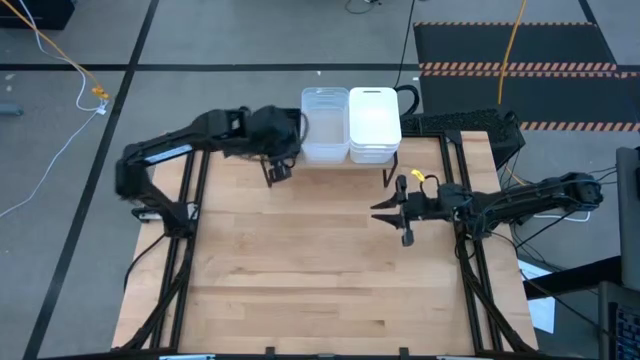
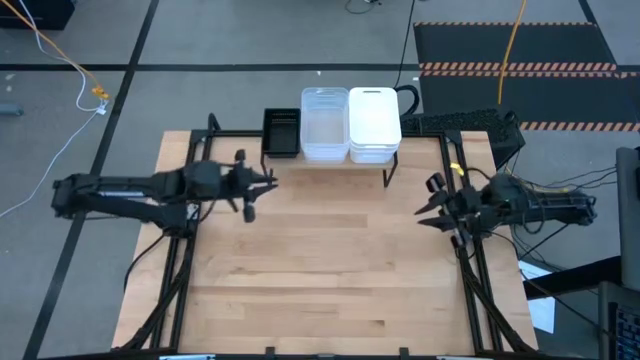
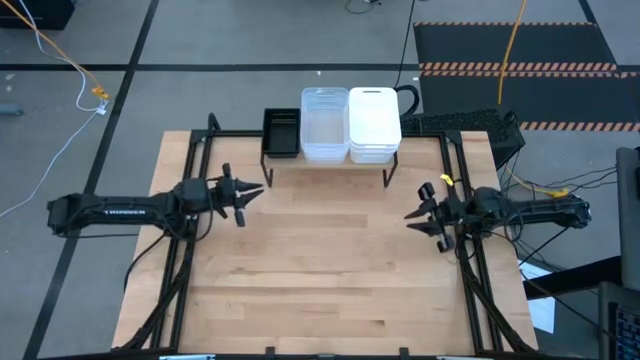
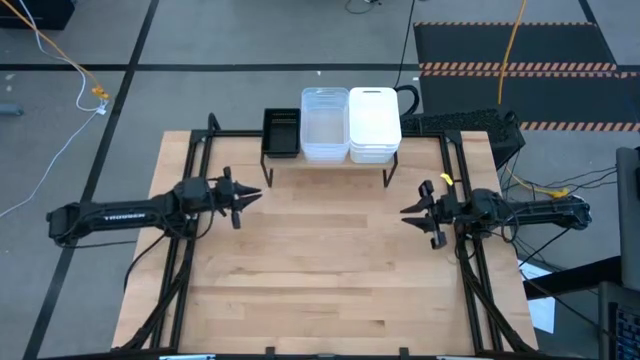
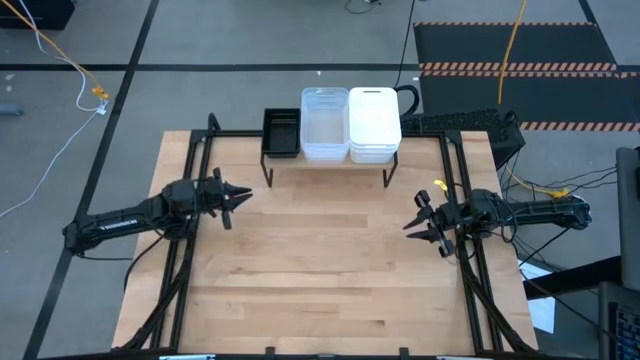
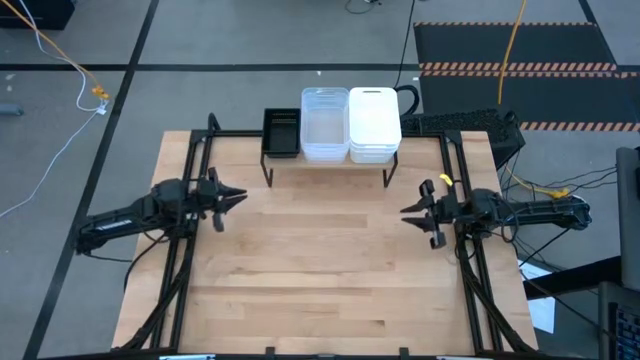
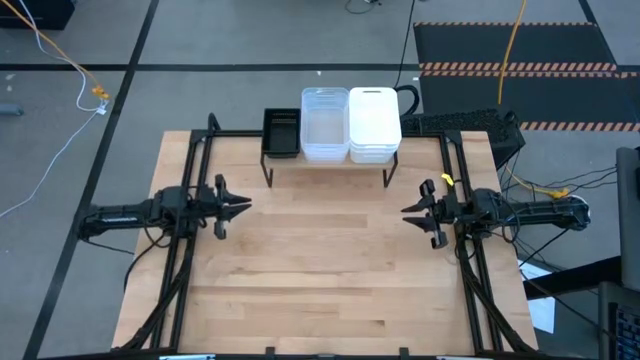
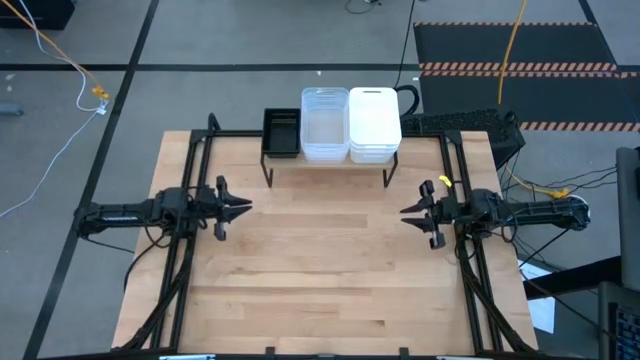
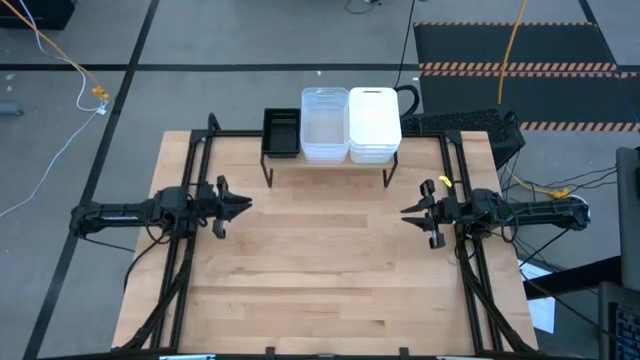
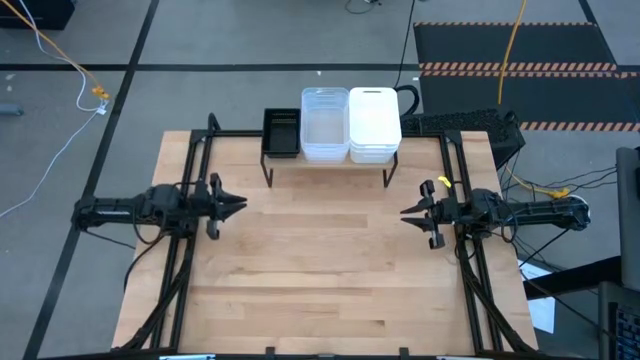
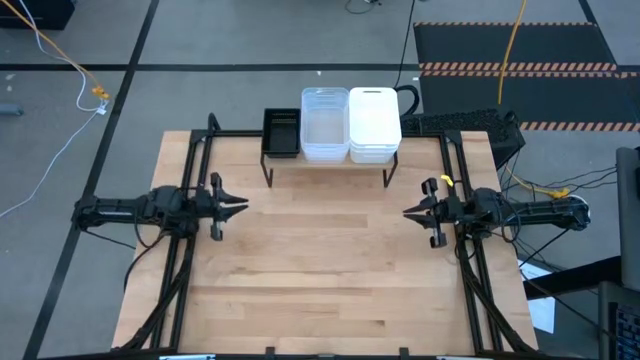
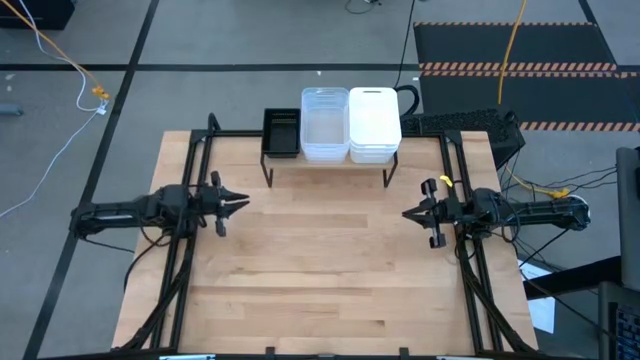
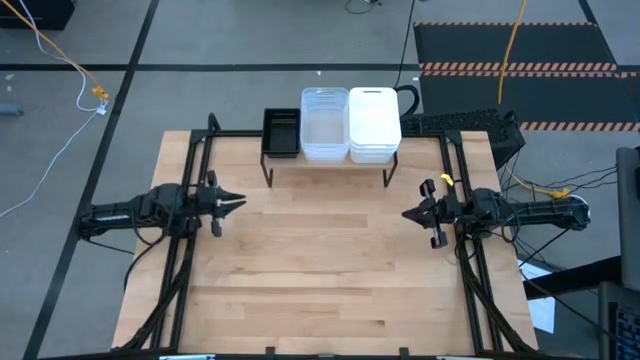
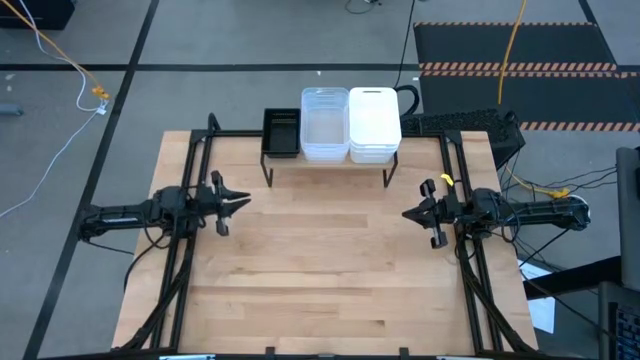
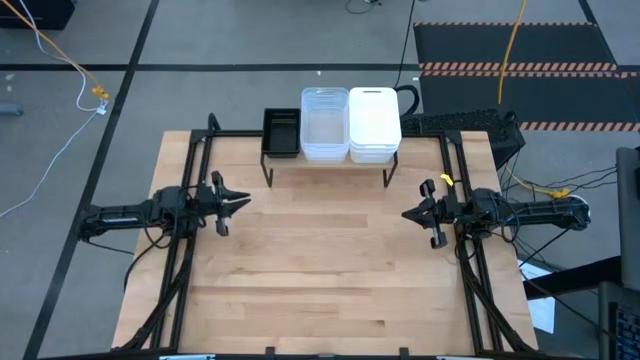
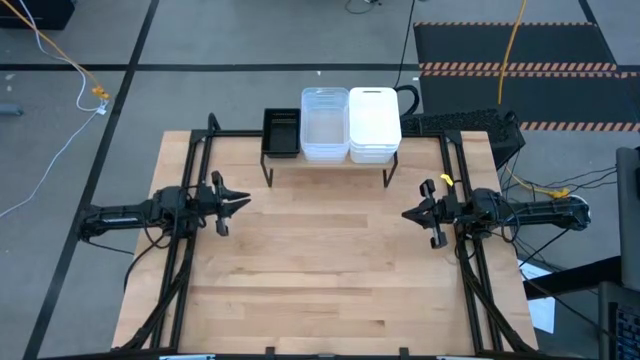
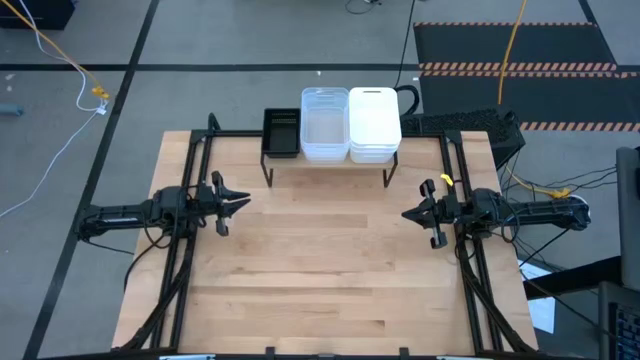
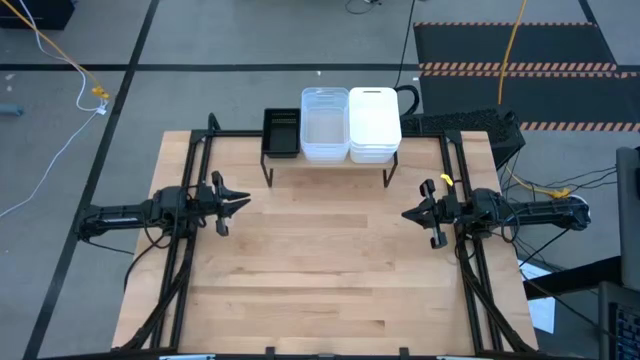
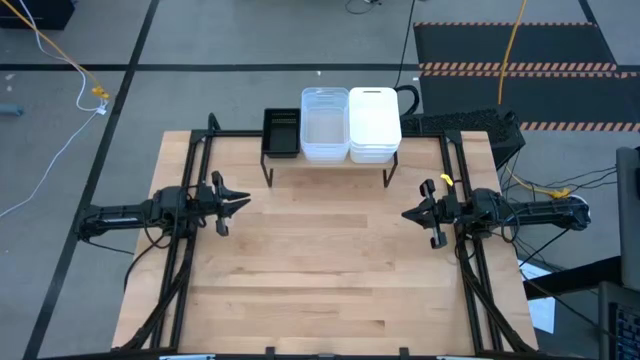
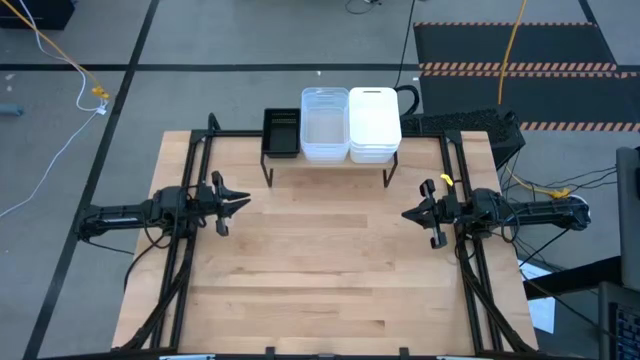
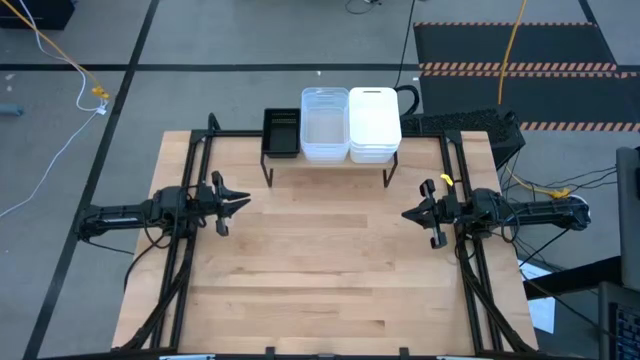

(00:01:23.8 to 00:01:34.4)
Task: Stack baskets on shelf by color
Return to Home Position

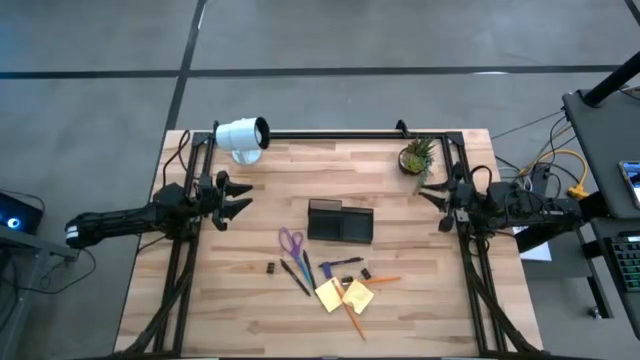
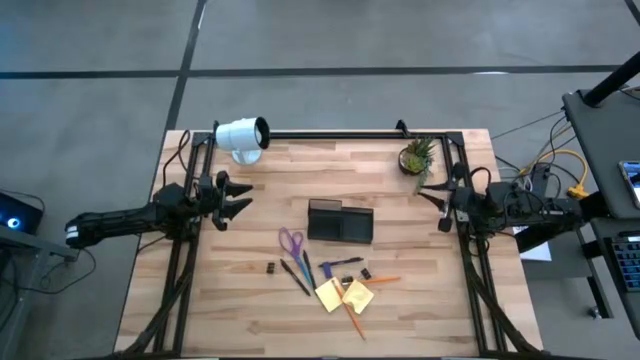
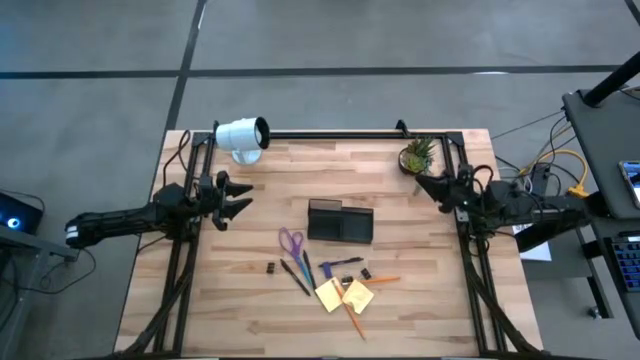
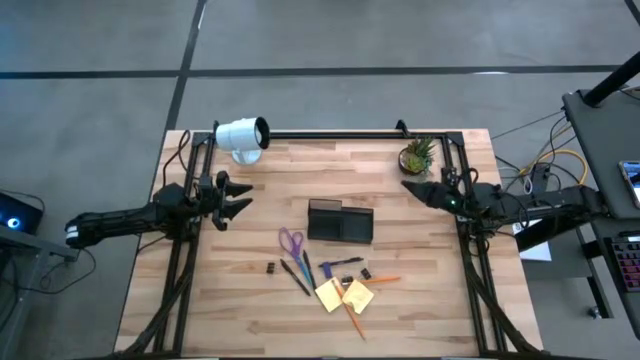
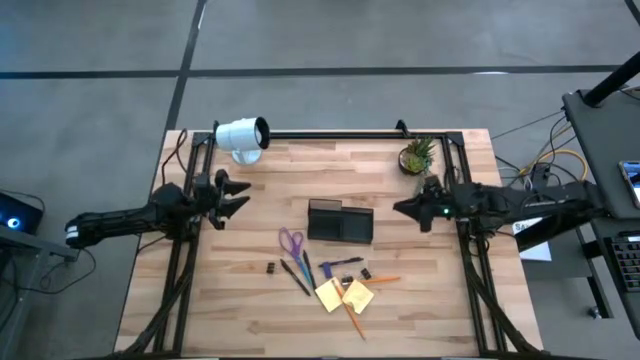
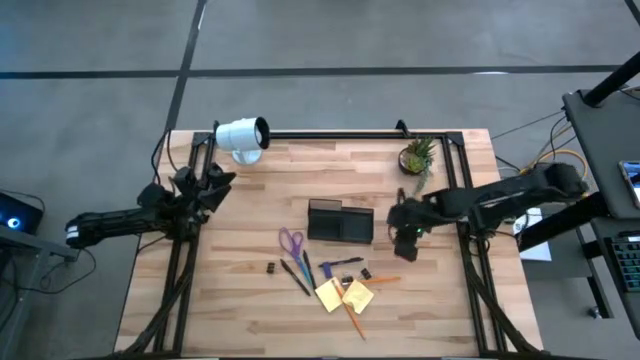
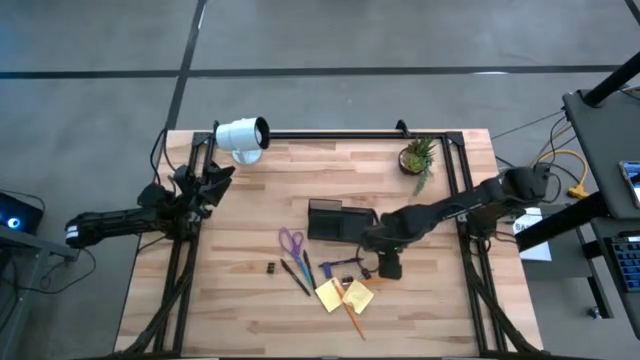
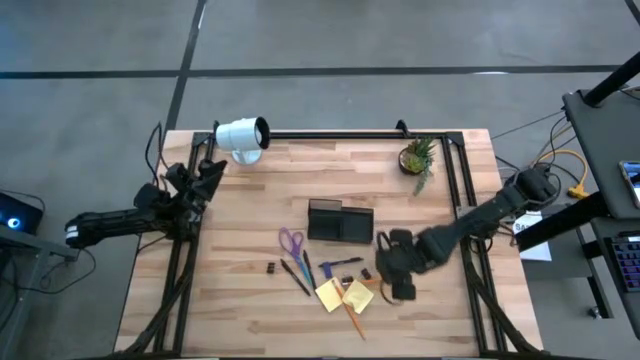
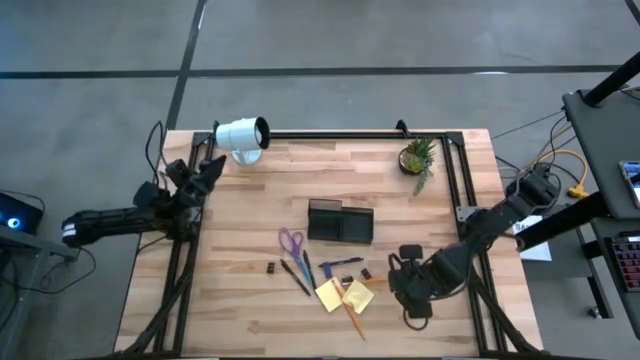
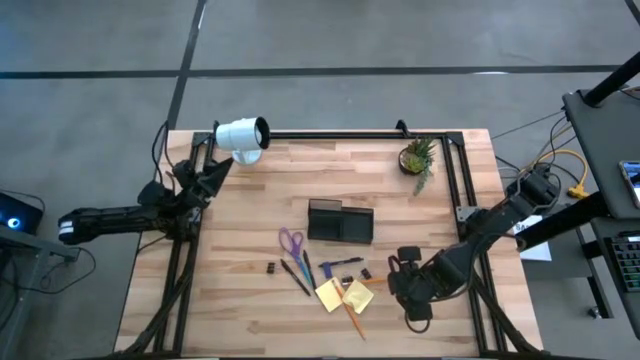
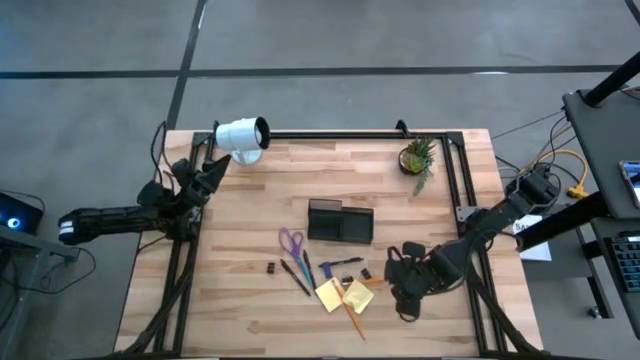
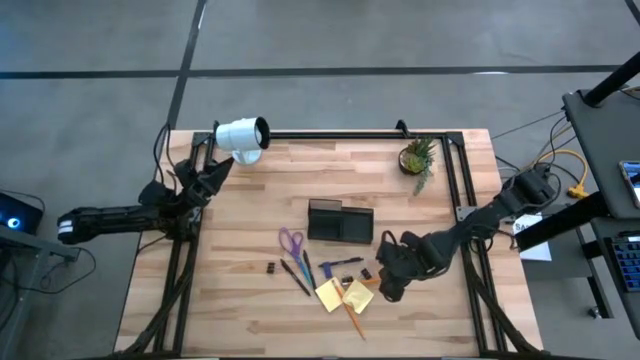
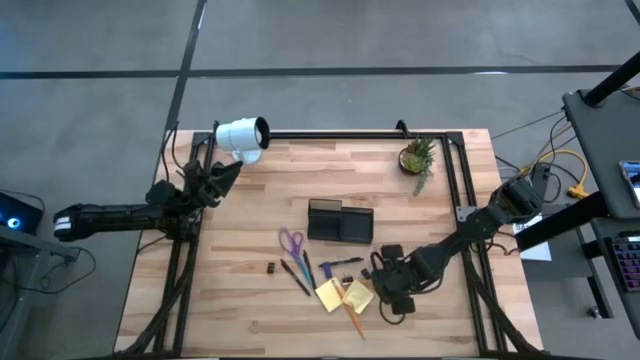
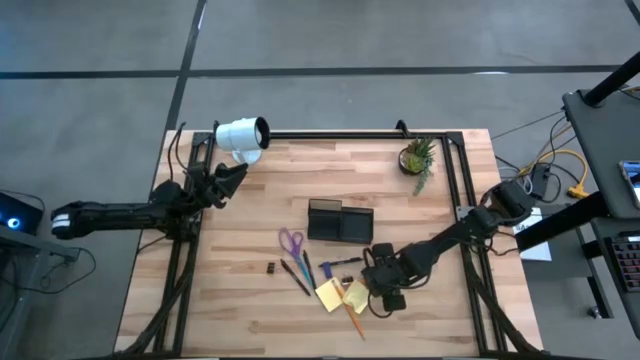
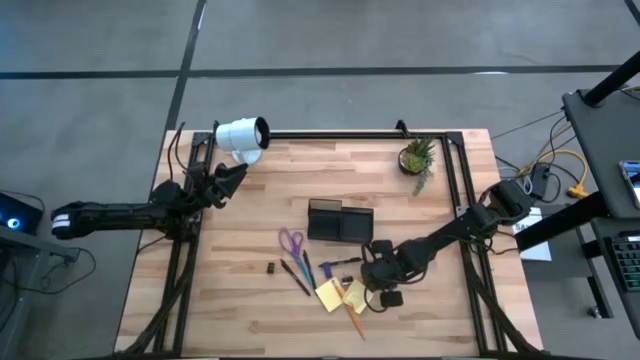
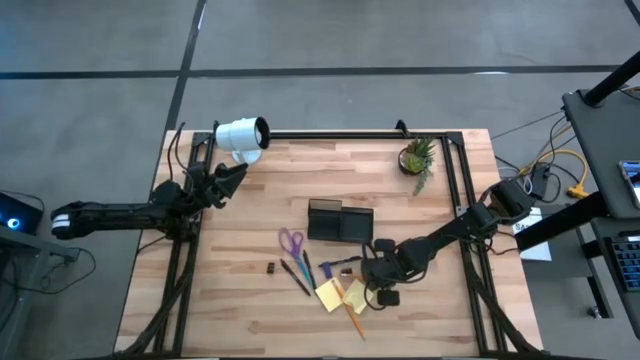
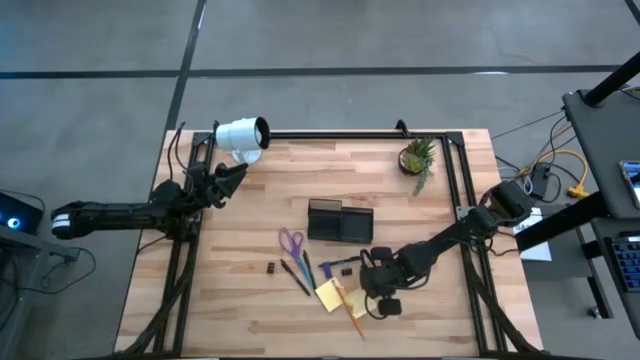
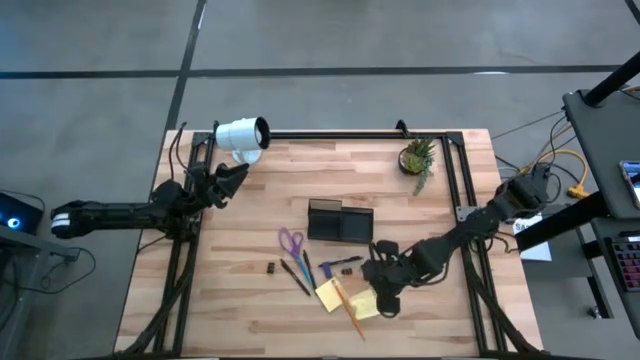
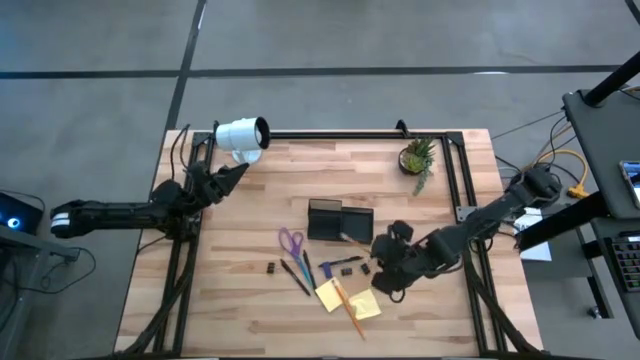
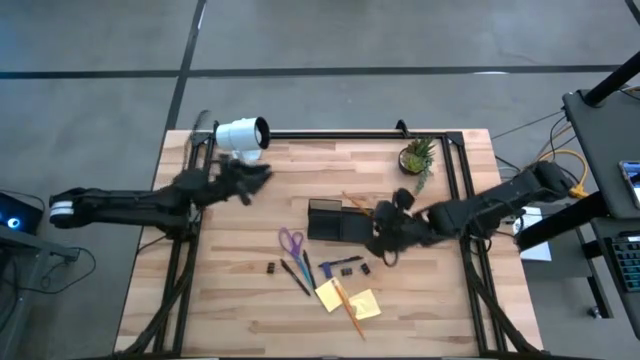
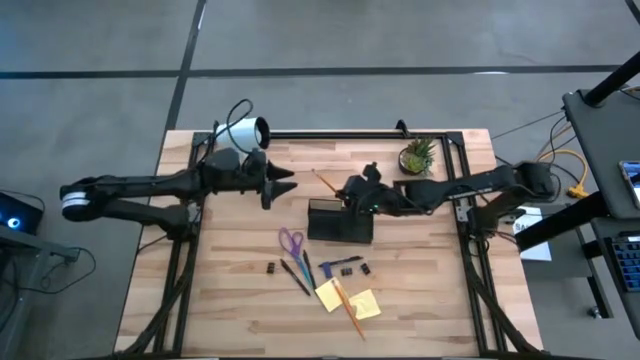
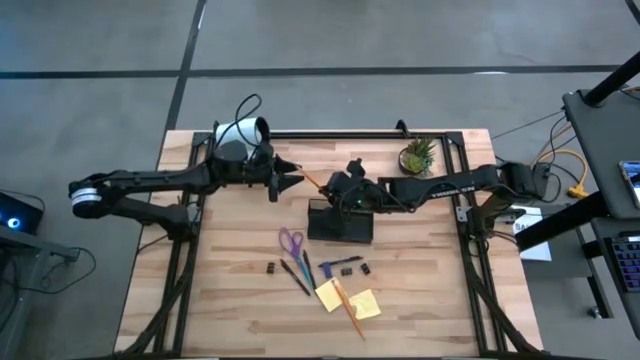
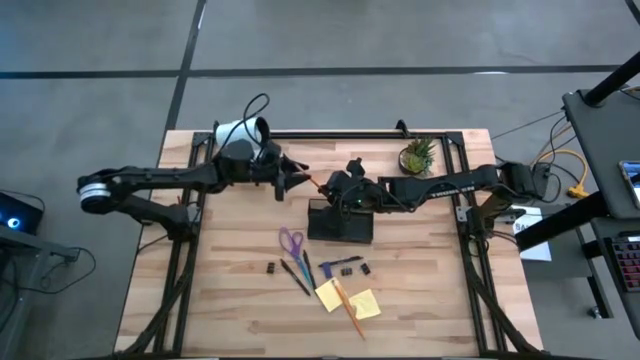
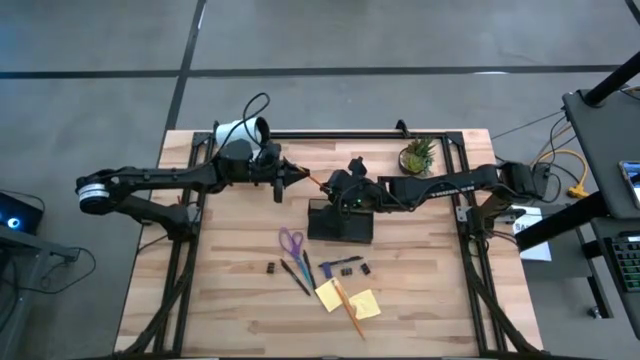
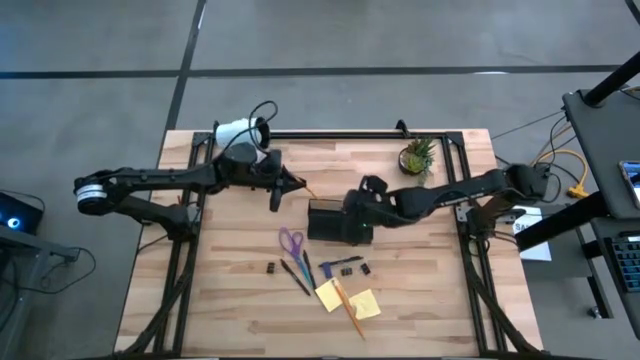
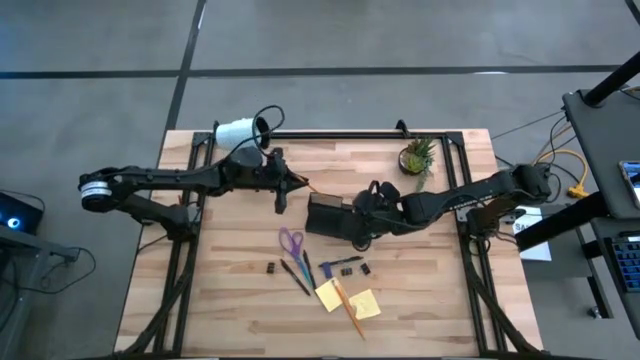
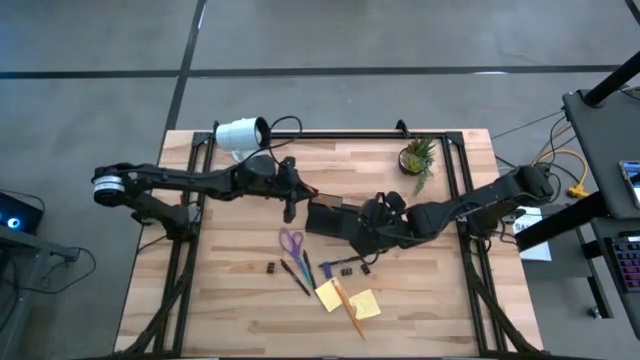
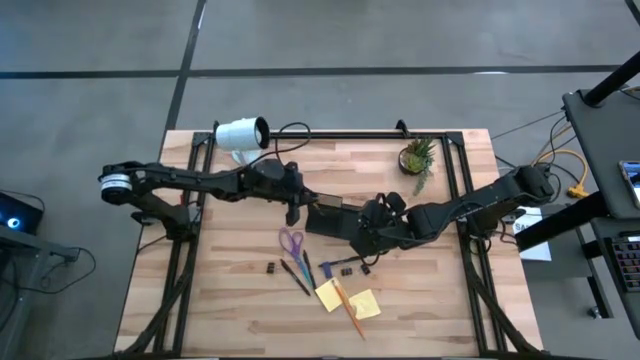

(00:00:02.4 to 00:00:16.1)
Task: Pick and place office supplies into organizer
Put the right orange pencil into the black desk organizer
